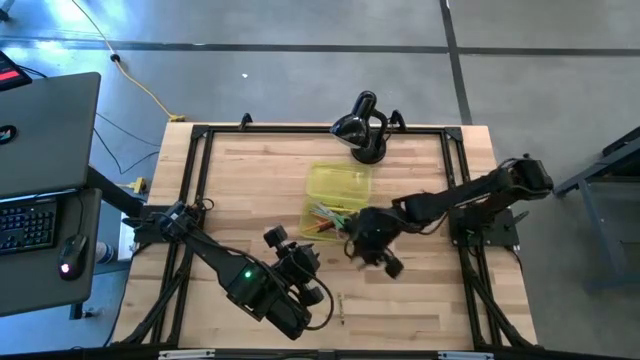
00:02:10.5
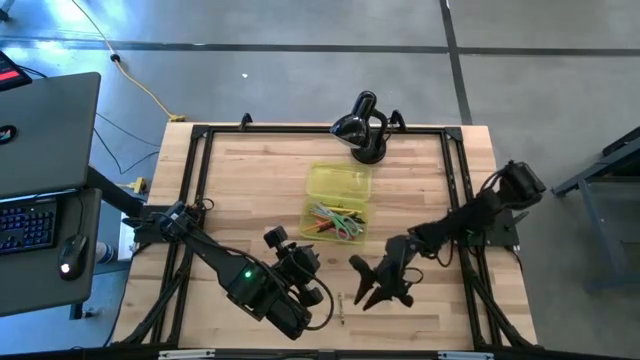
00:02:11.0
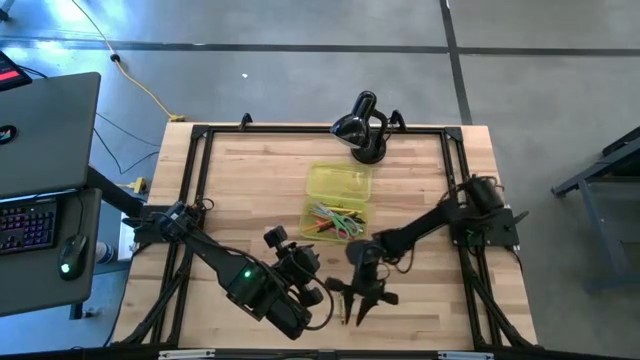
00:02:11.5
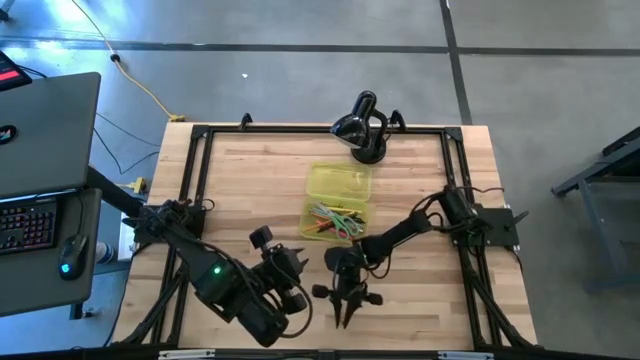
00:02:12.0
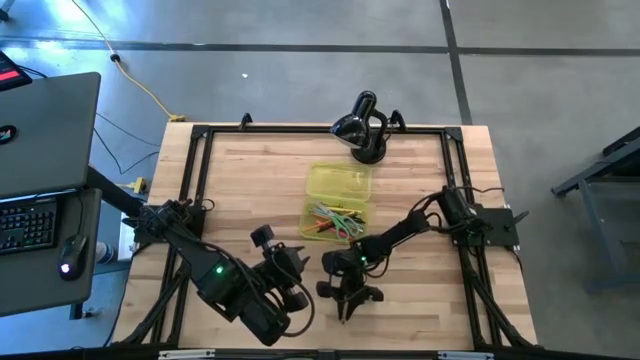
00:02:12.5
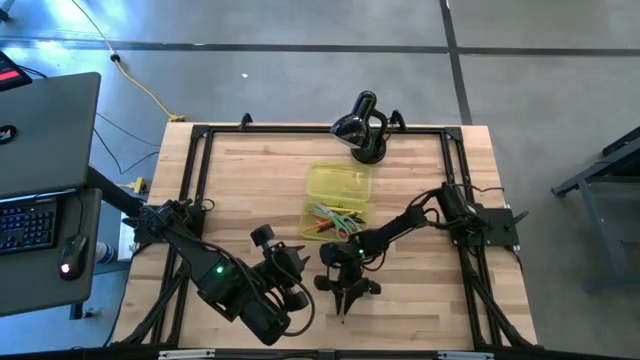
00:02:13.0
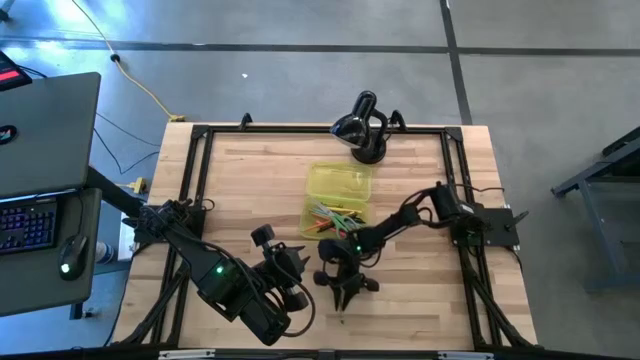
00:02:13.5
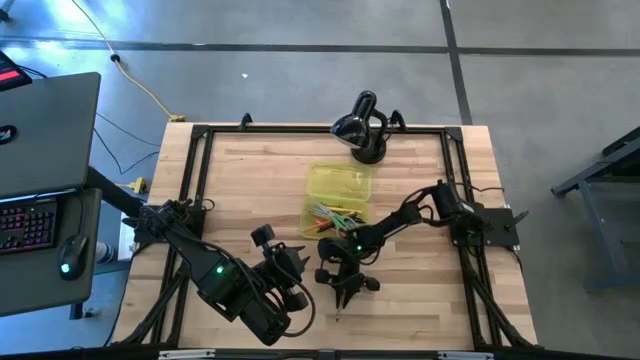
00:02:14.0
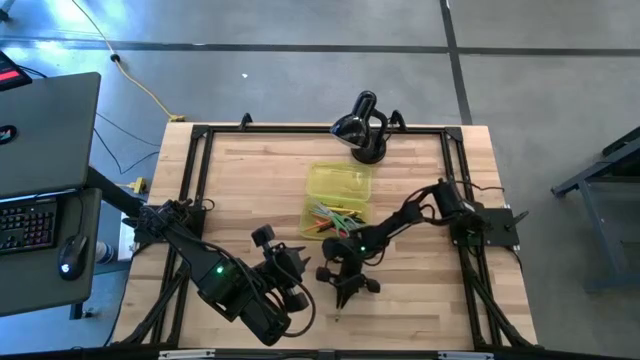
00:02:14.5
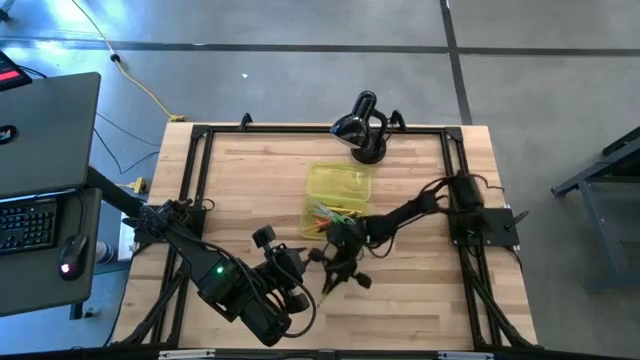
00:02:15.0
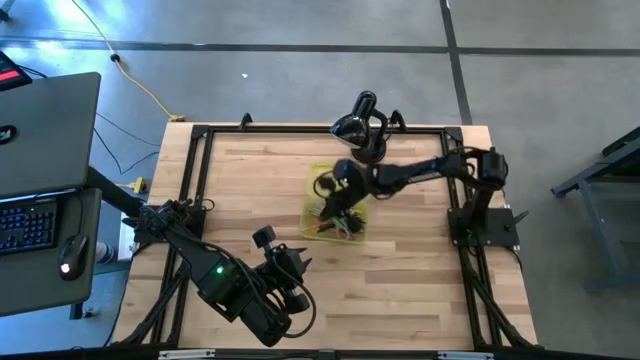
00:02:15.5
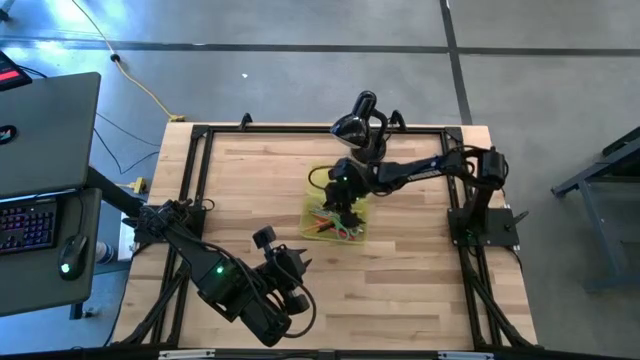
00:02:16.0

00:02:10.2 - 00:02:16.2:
Task: Pick & place school supplies into a supply box
Put the green crayons into the yellow school supply box

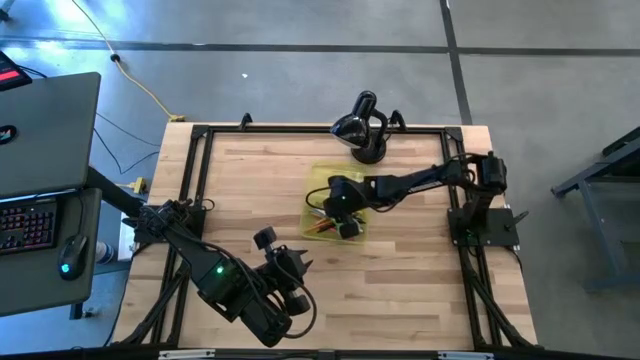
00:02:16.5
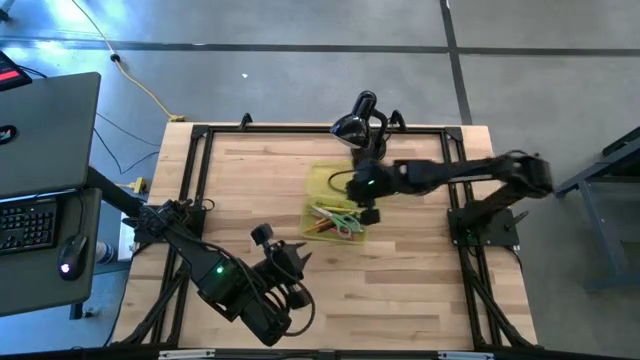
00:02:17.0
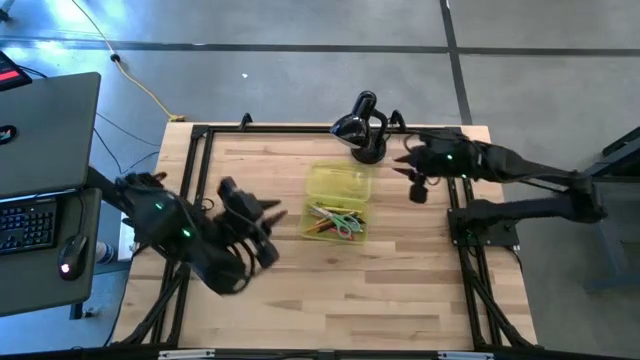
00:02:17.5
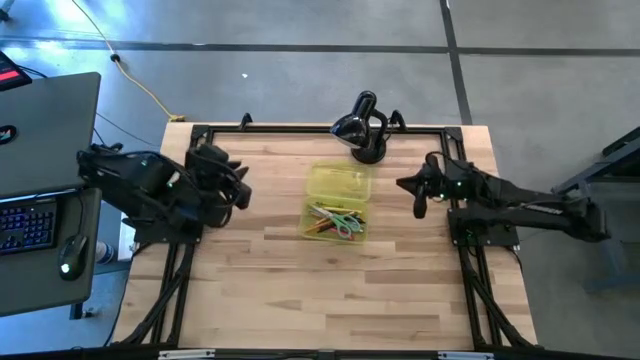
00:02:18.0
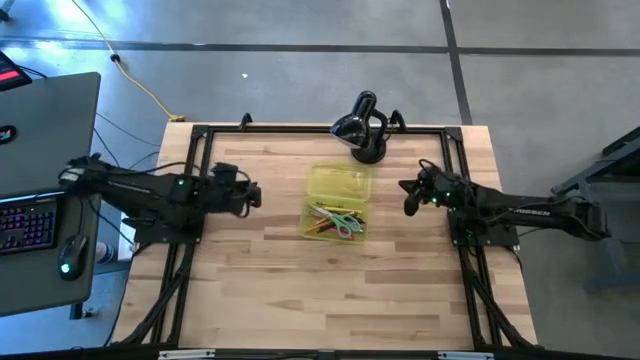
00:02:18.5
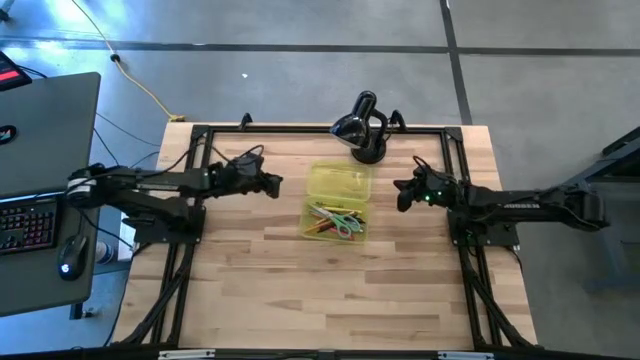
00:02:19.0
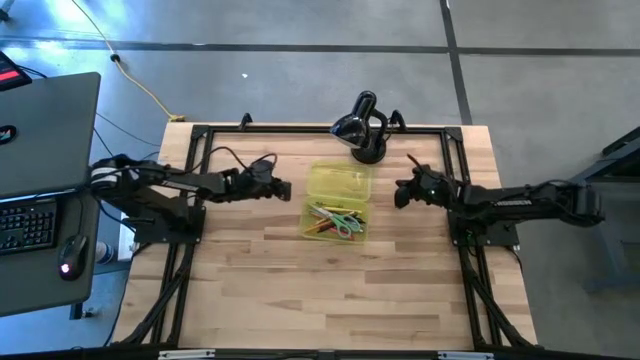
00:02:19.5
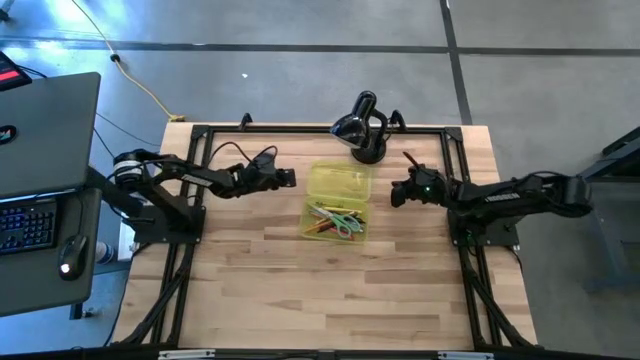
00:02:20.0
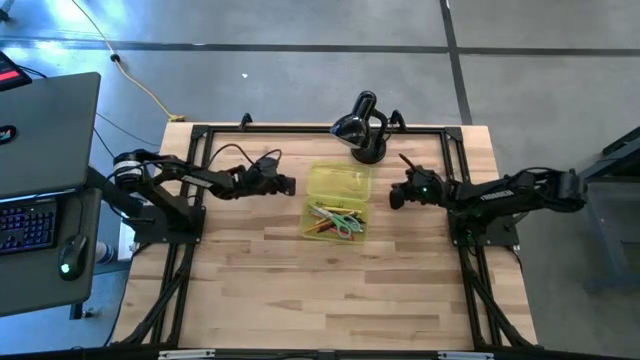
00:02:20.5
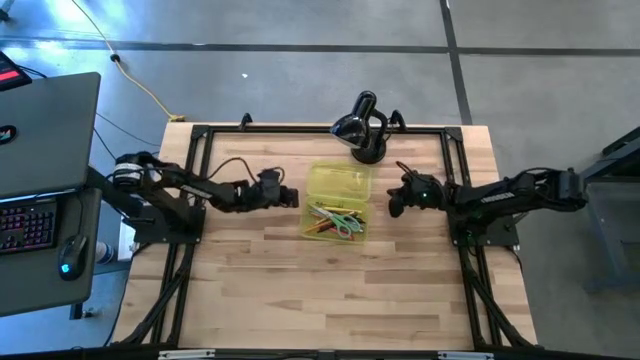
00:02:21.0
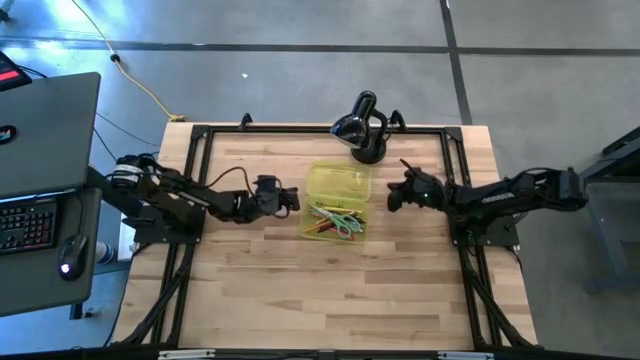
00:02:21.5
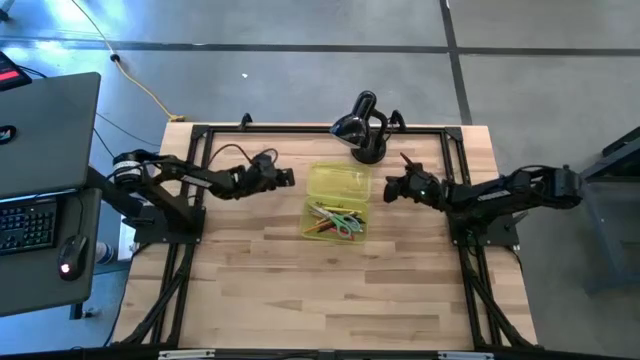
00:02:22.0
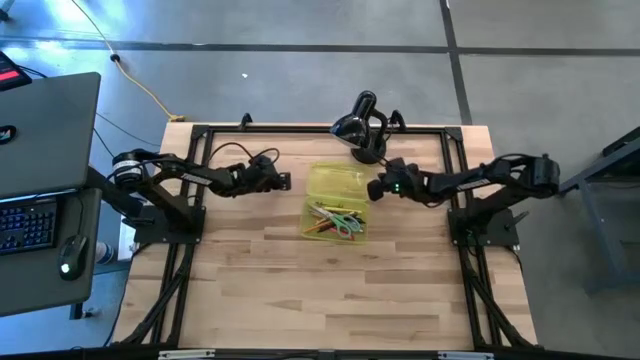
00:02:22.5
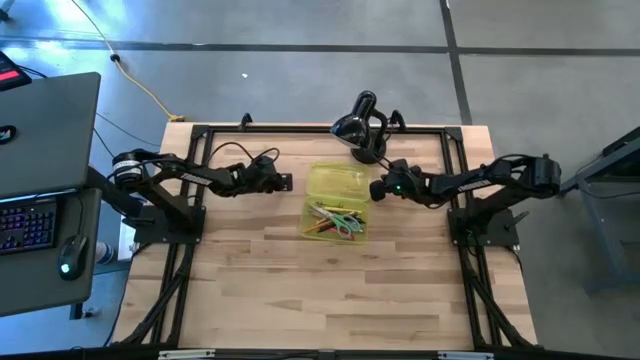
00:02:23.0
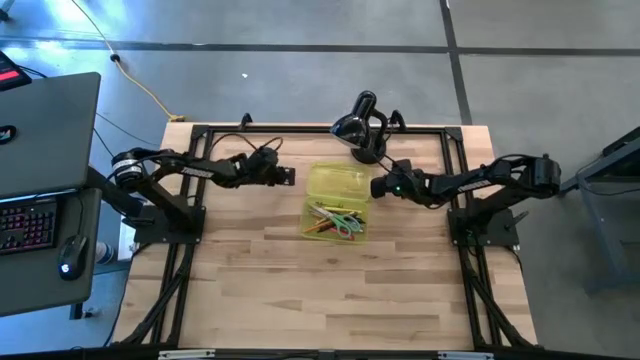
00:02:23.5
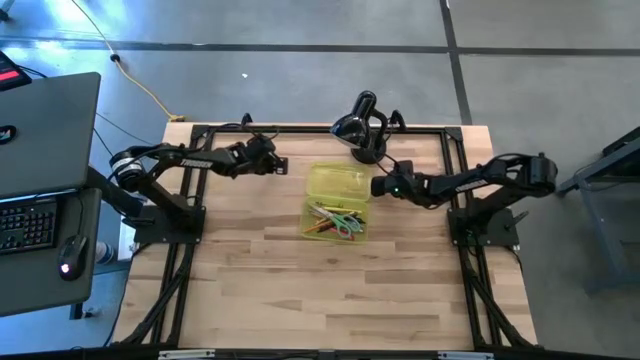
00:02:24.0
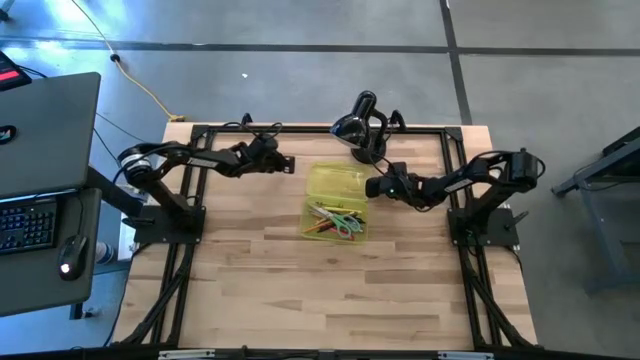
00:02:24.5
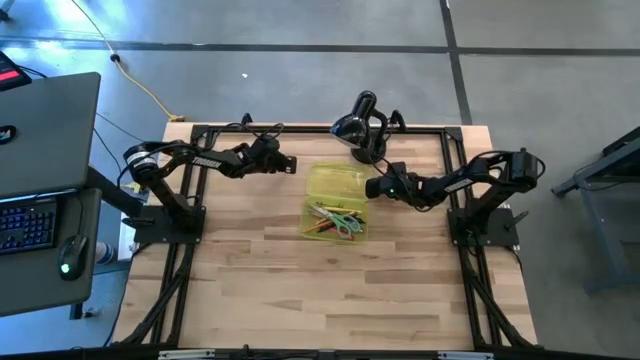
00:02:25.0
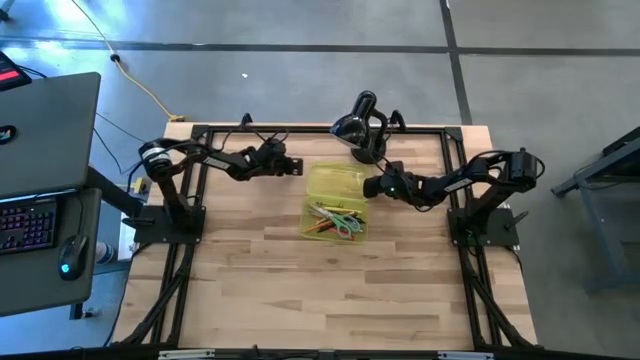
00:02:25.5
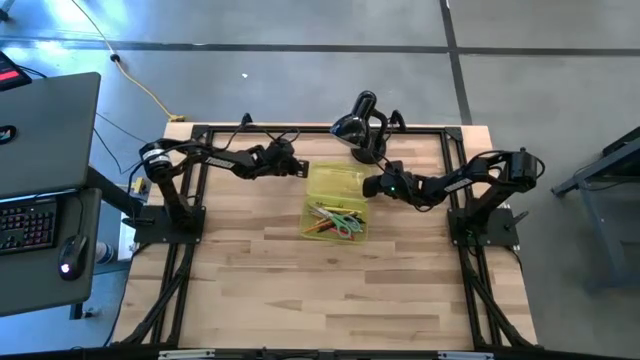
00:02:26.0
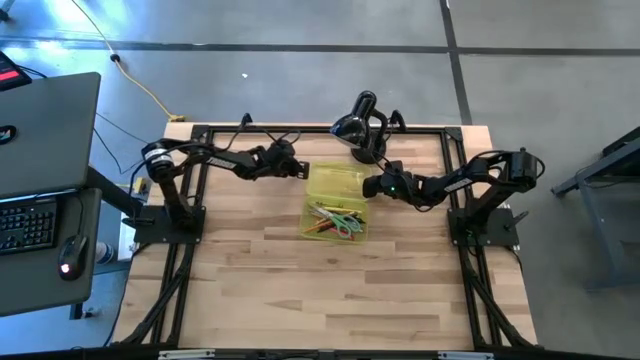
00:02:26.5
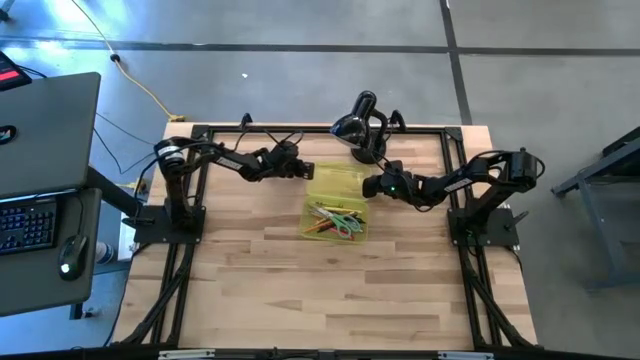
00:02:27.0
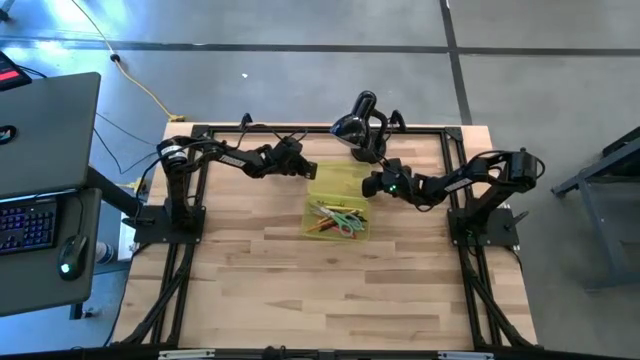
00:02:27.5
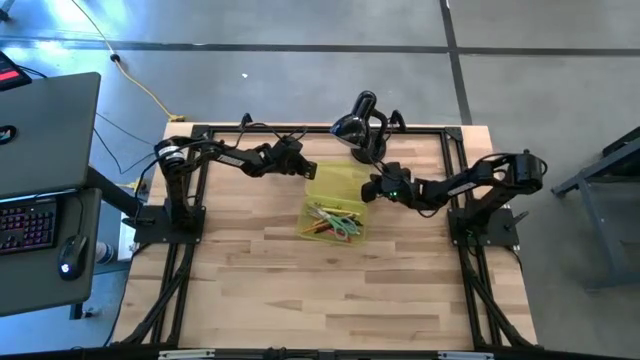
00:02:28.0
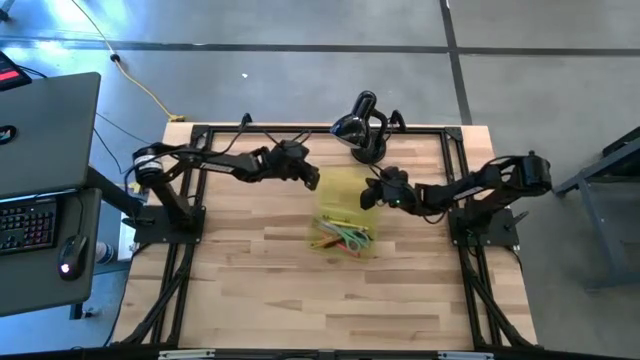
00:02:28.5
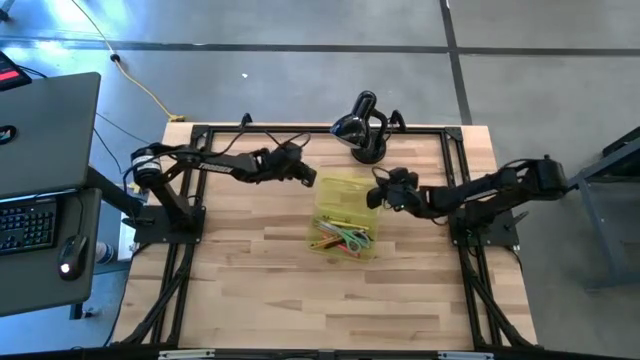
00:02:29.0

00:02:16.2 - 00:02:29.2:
Close the yellow school supply box
